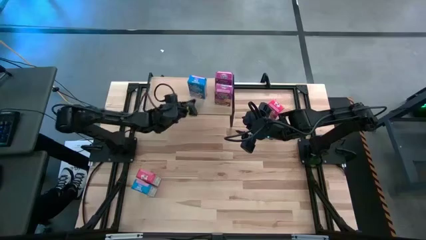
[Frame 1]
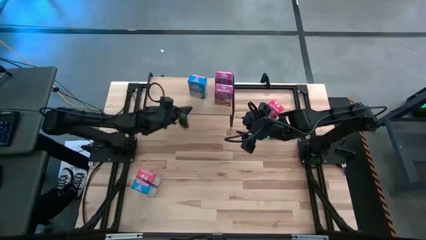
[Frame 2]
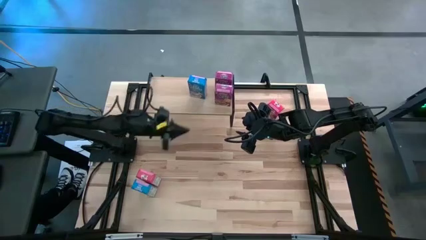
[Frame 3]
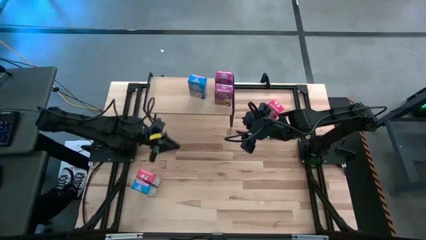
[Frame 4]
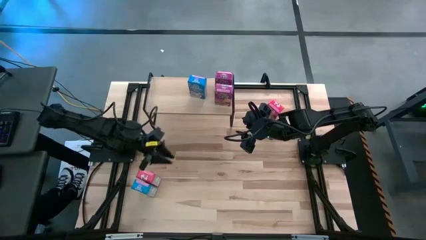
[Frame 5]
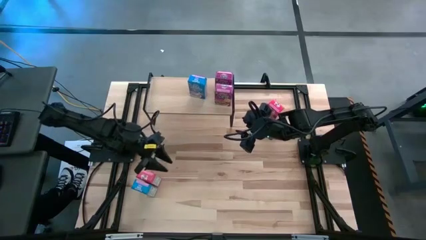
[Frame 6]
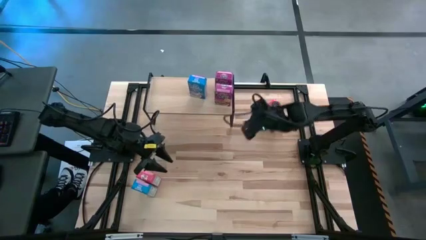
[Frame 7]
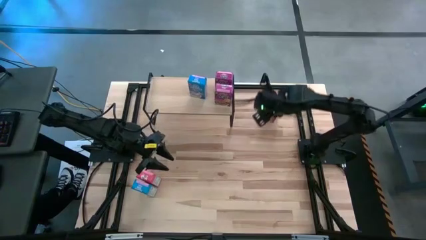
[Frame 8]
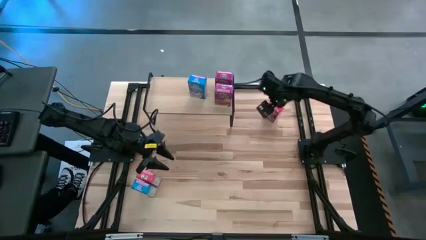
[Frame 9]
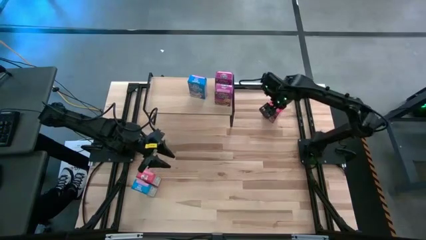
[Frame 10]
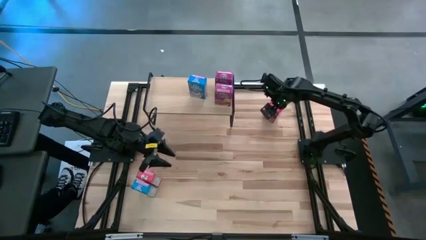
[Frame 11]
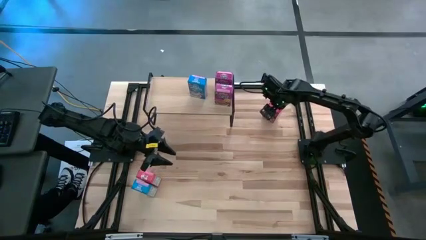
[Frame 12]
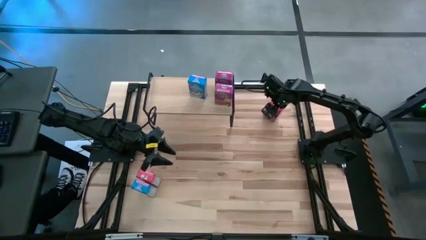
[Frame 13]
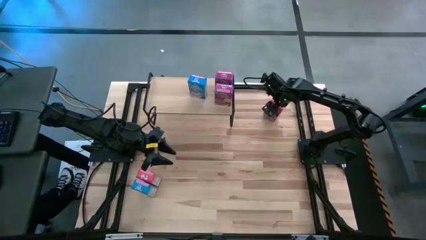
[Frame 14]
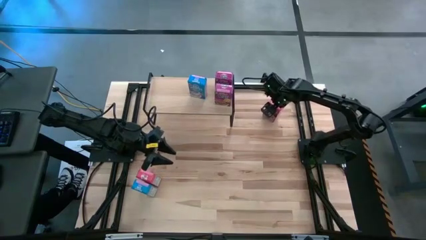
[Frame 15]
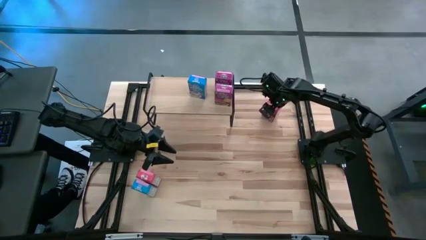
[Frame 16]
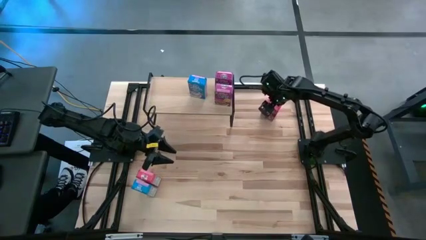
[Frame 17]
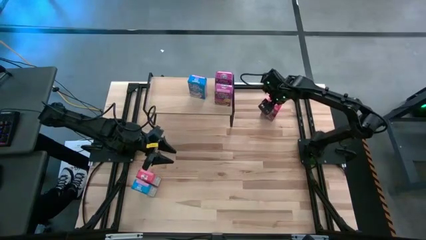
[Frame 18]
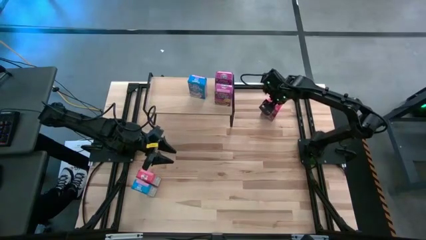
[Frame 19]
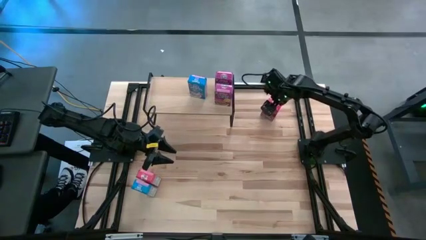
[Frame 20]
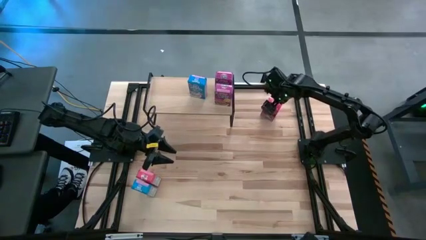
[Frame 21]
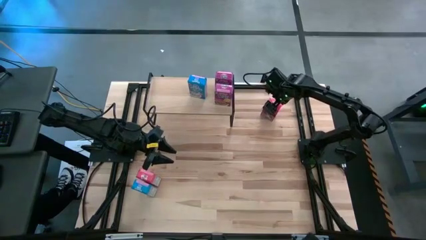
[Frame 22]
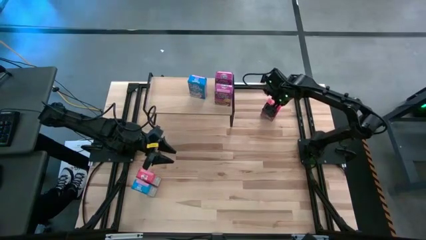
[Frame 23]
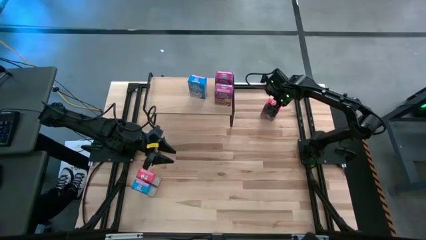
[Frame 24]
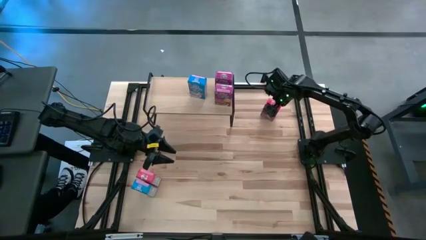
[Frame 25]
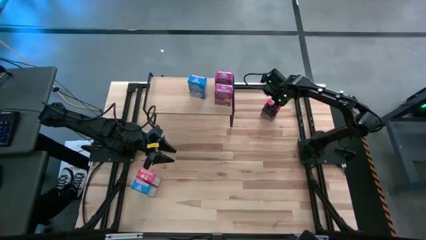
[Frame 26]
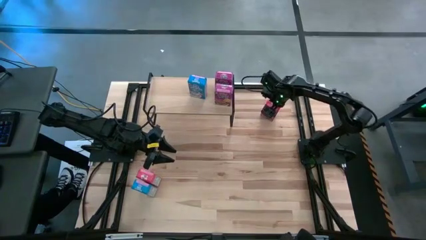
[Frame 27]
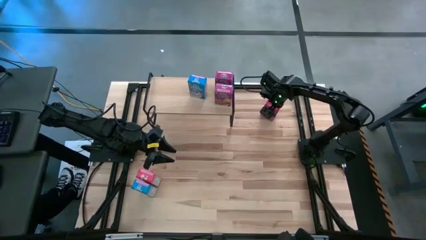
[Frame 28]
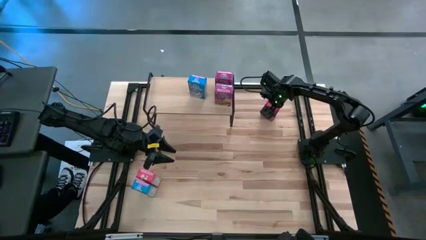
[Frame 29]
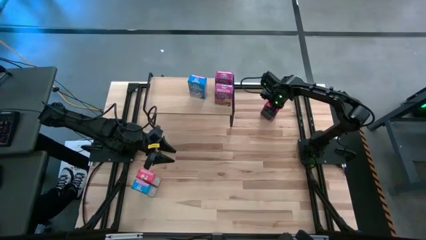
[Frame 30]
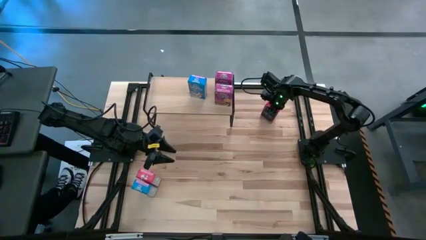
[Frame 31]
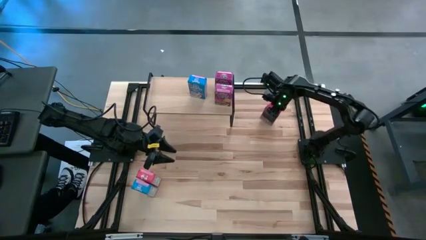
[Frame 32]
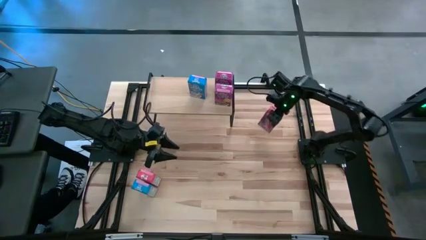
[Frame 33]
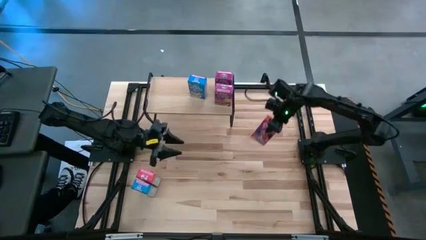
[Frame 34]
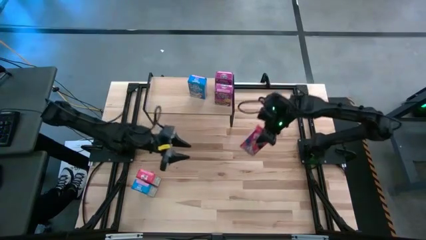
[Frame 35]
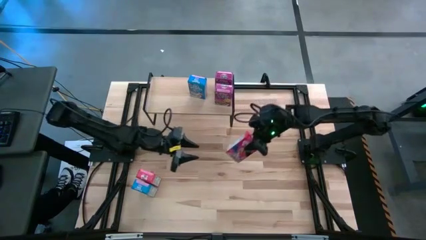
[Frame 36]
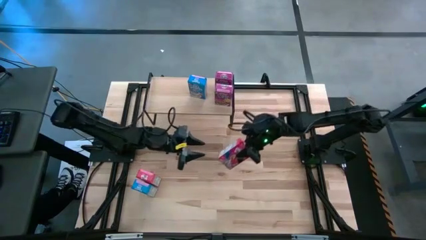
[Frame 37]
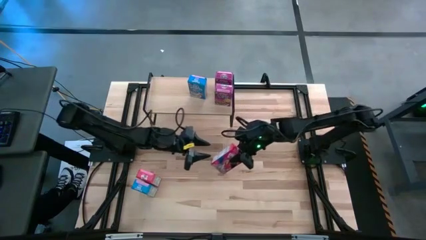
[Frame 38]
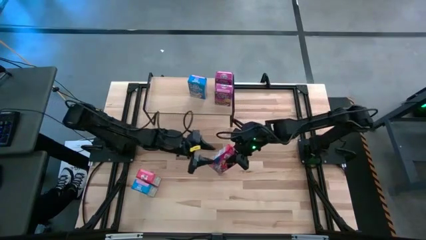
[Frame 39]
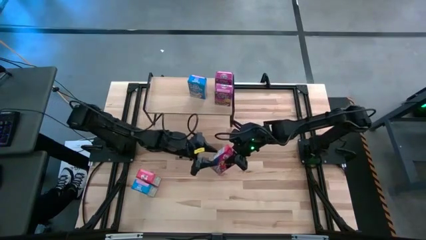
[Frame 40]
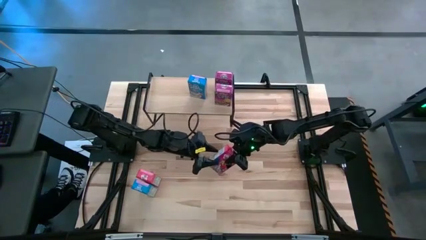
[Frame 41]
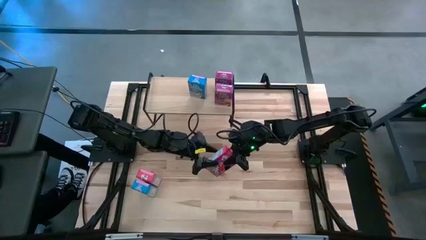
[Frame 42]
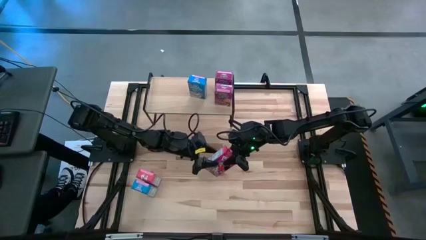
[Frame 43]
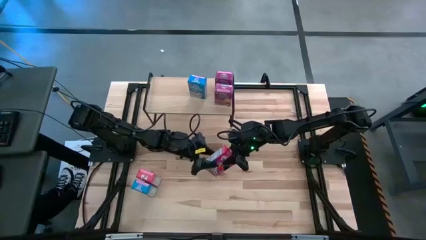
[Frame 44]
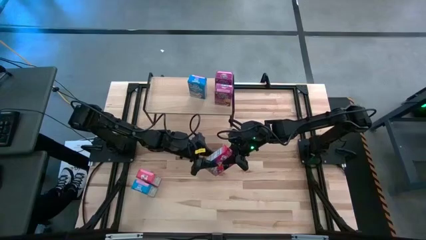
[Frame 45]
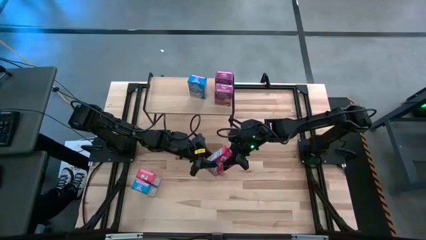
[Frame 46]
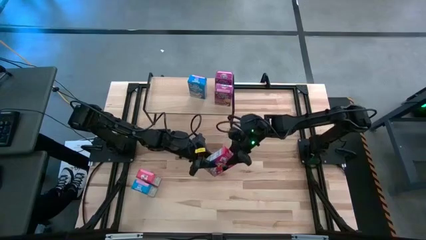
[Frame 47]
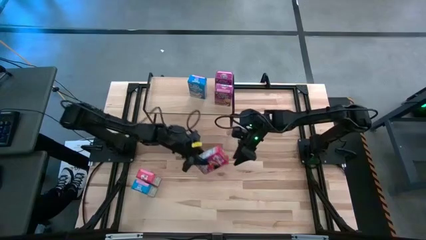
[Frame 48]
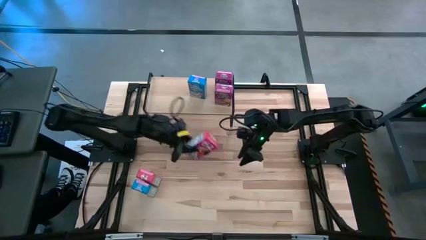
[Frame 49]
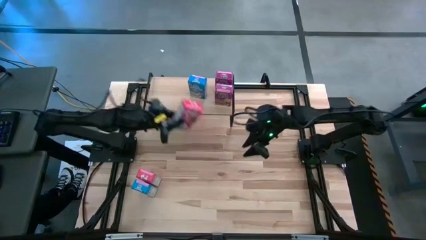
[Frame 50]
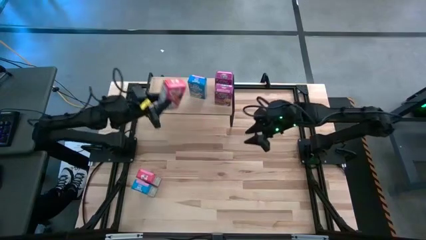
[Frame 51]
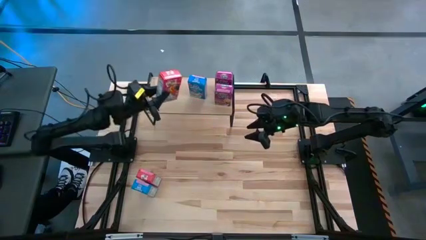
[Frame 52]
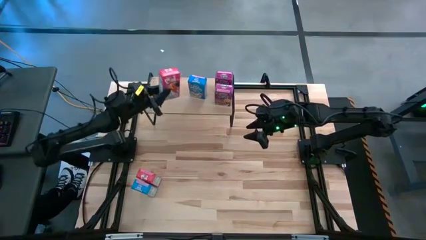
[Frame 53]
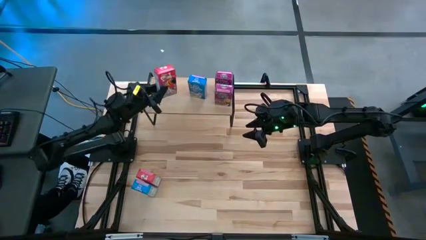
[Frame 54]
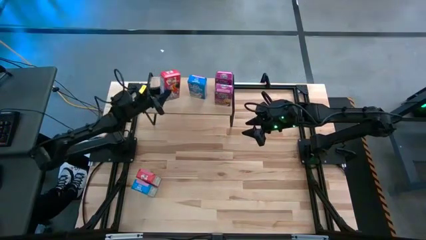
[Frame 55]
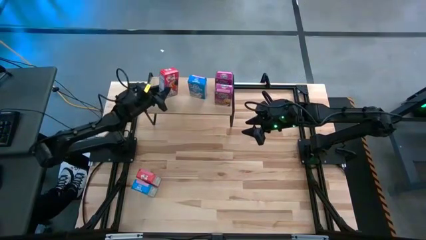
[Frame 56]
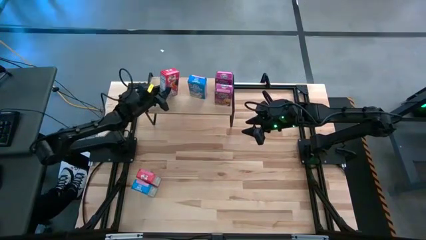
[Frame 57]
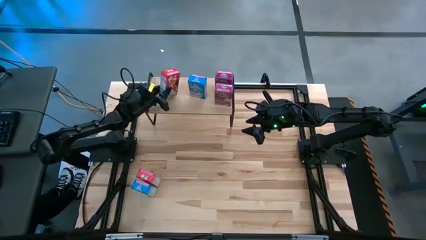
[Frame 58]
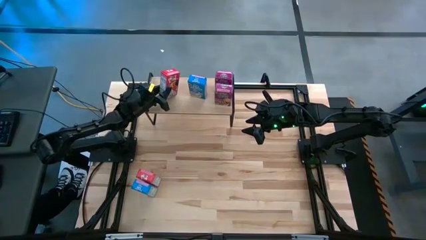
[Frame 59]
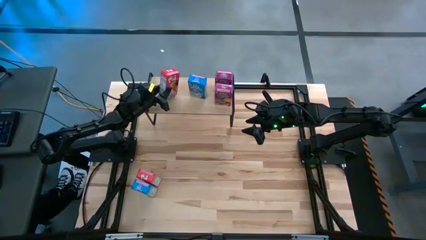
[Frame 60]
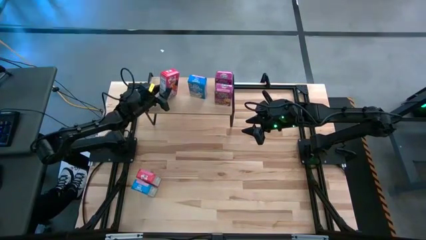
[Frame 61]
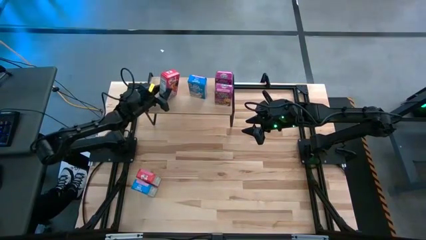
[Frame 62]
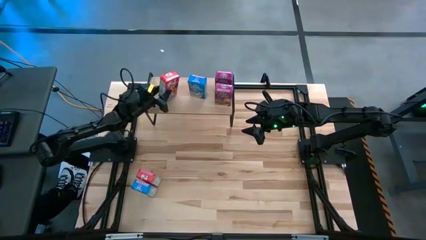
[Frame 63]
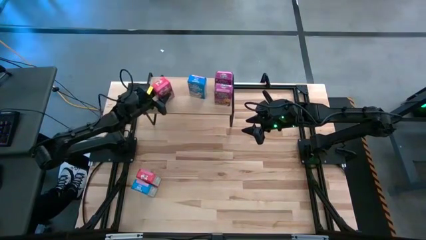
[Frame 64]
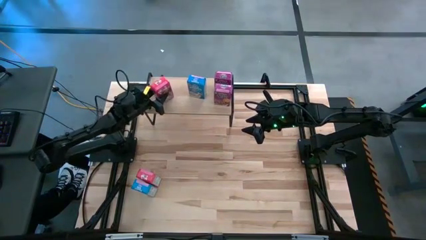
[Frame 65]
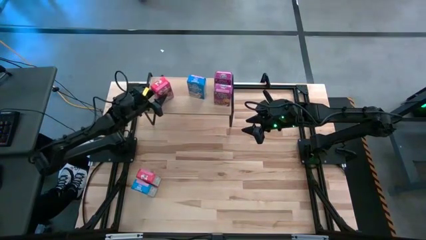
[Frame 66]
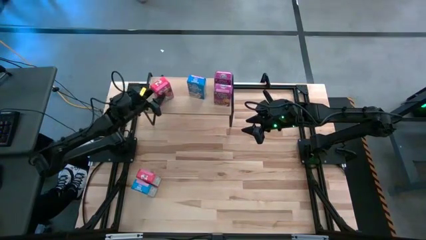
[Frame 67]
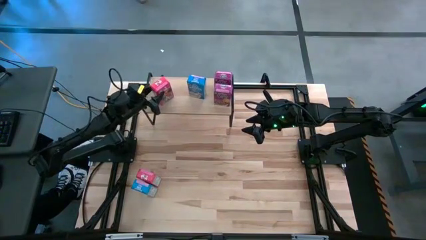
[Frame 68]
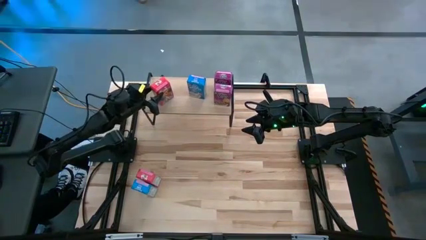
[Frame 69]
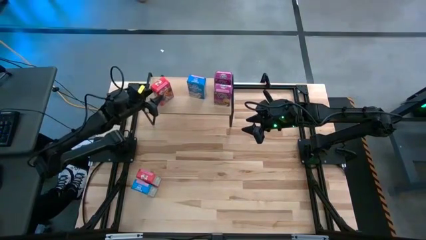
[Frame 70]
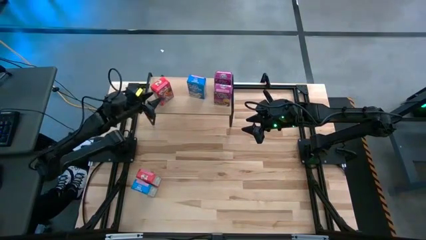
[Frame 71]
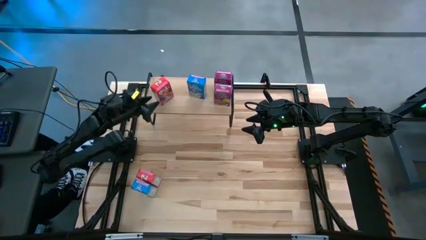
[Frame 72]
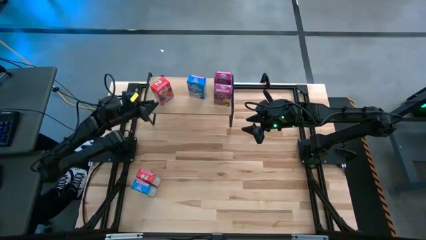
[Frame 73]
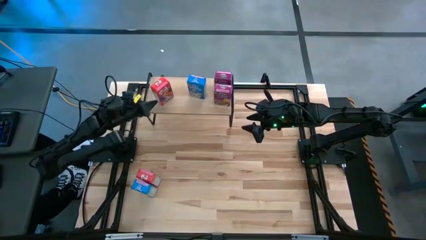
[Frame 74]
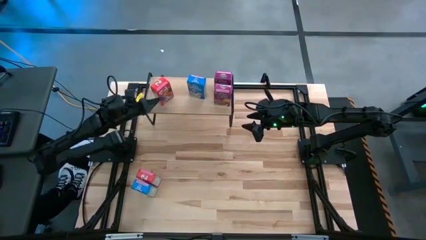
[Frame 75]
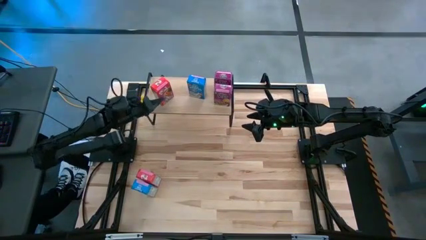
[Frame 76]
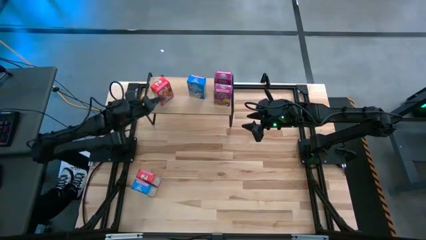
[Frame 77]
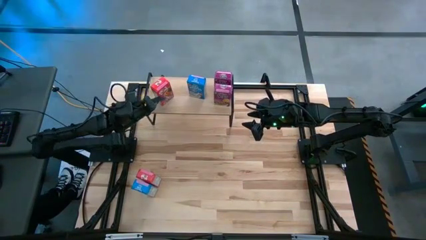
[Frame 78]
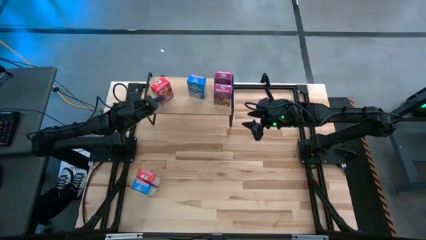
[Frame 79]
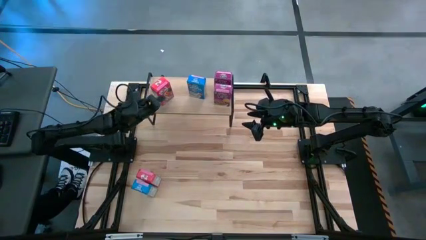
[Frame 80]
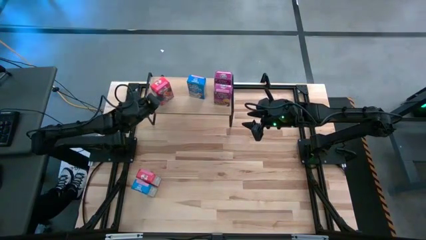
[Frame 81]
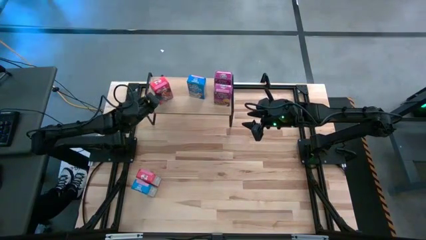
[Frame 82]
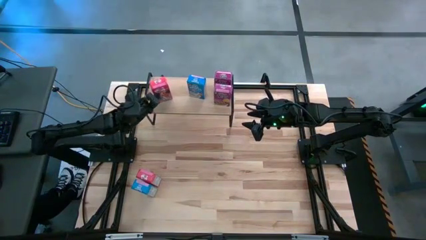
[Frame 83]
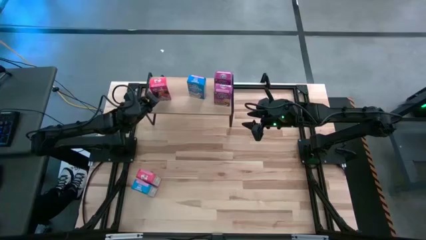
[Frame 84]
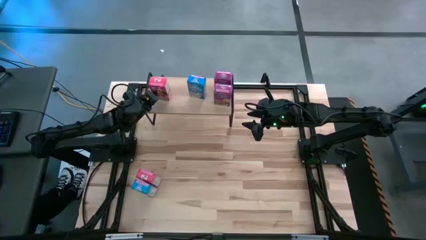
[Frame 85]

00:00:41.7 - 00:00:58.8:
Task: Stack cereal on shelf
Put the top red cereal box on the shelf
